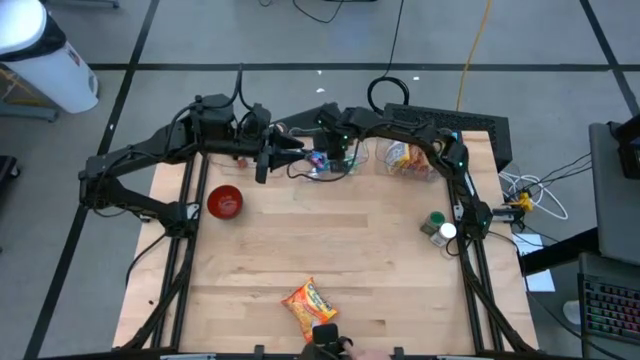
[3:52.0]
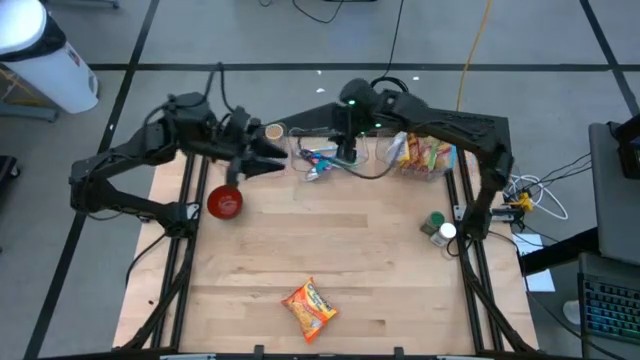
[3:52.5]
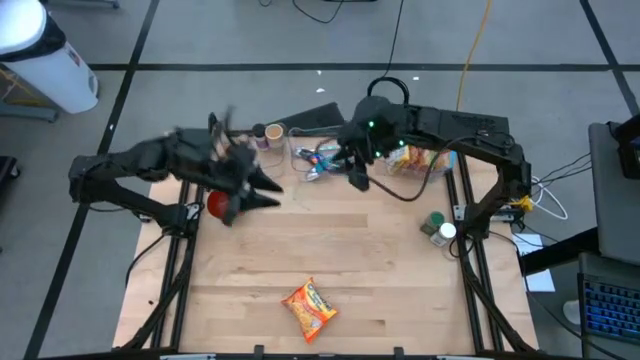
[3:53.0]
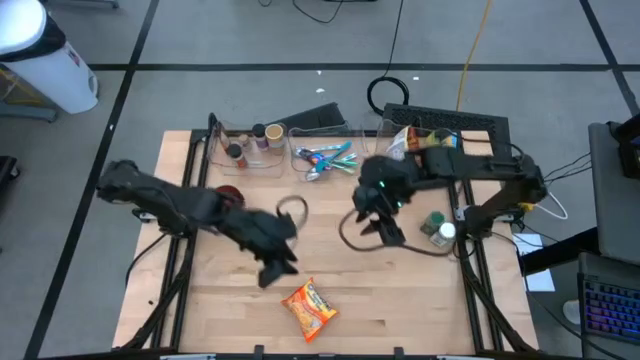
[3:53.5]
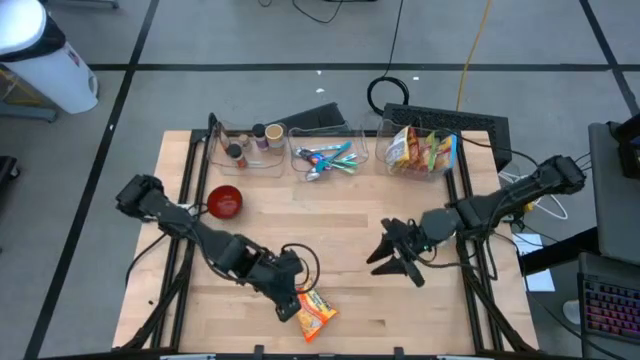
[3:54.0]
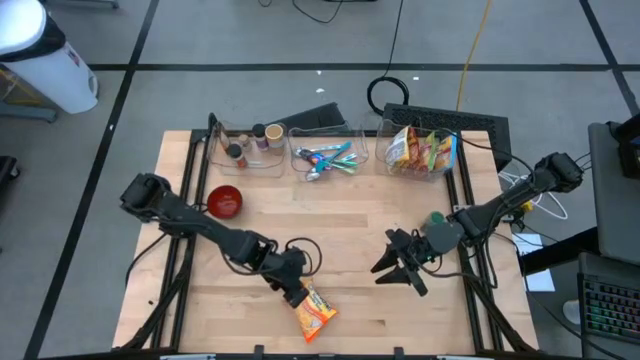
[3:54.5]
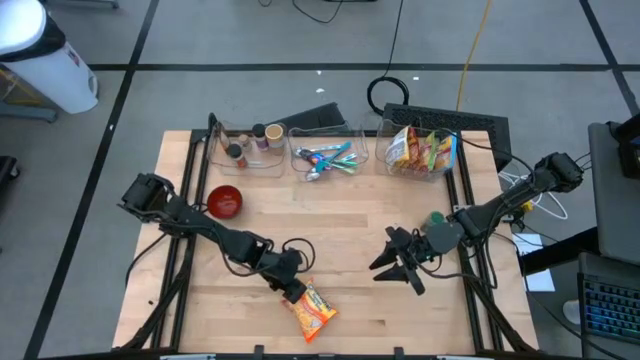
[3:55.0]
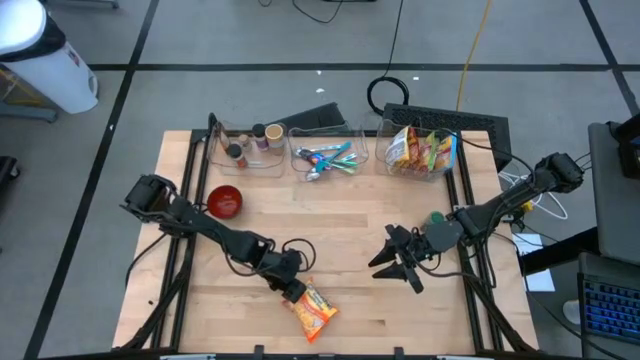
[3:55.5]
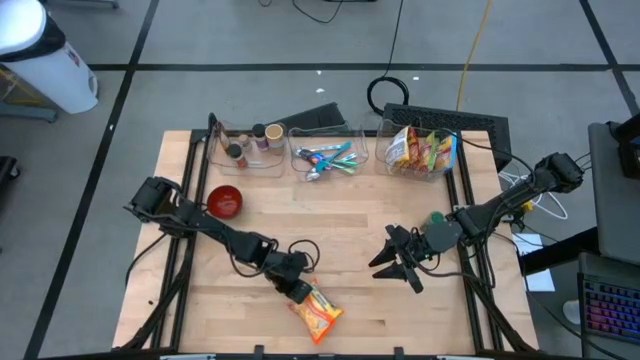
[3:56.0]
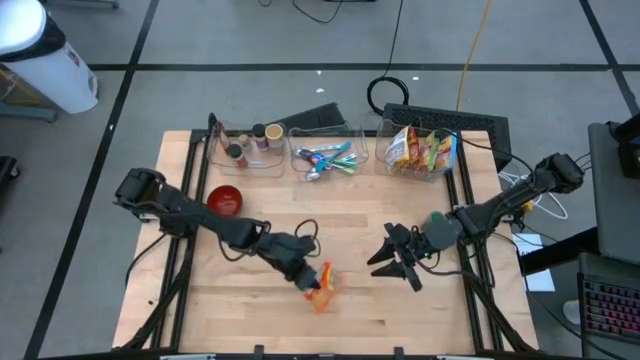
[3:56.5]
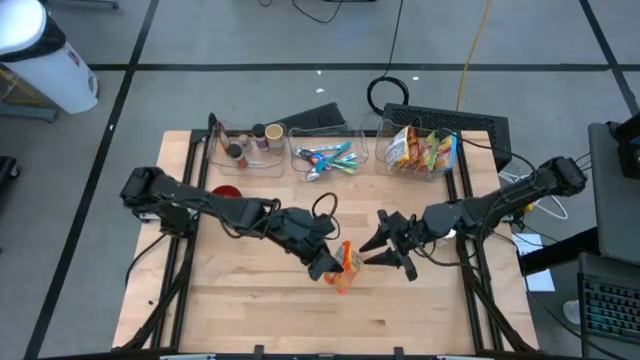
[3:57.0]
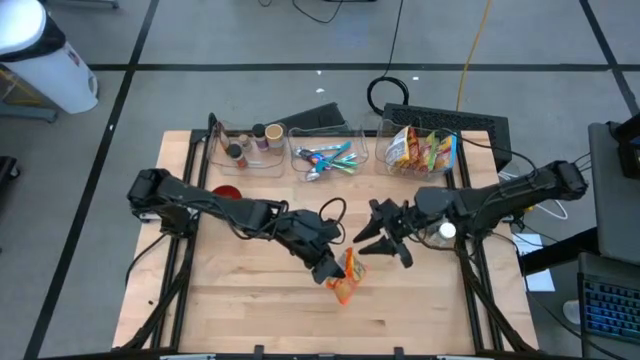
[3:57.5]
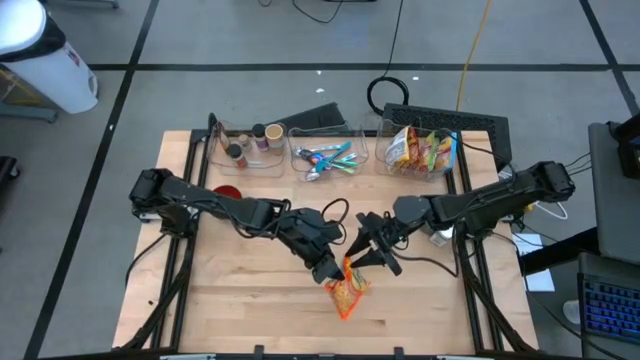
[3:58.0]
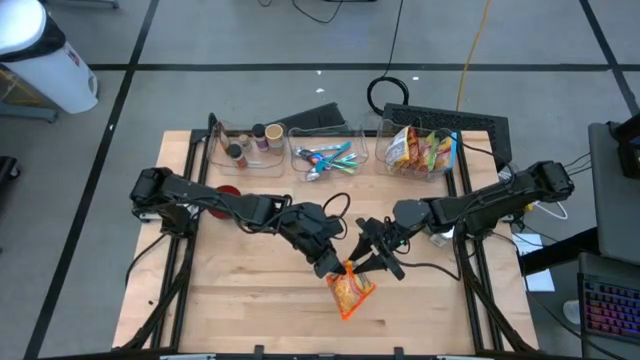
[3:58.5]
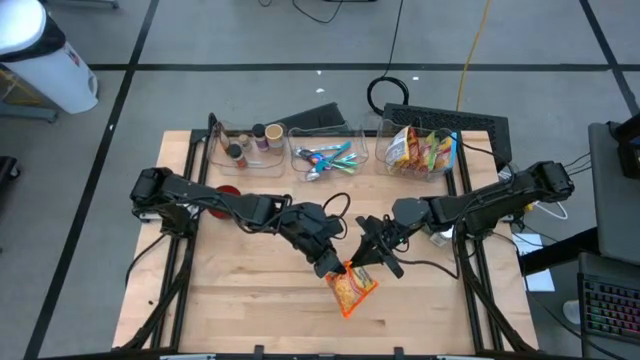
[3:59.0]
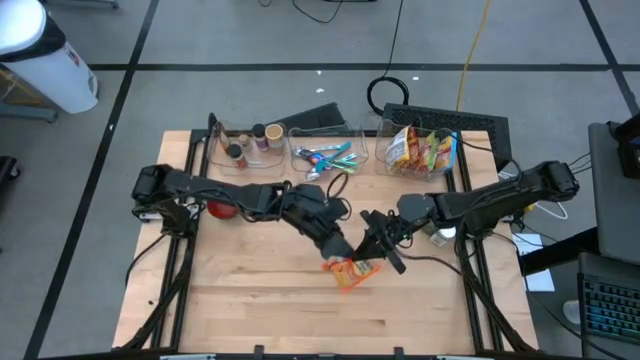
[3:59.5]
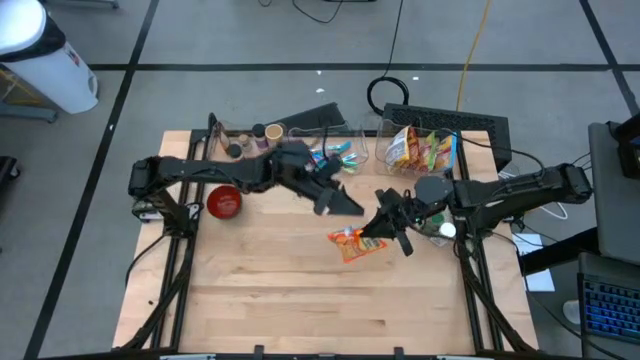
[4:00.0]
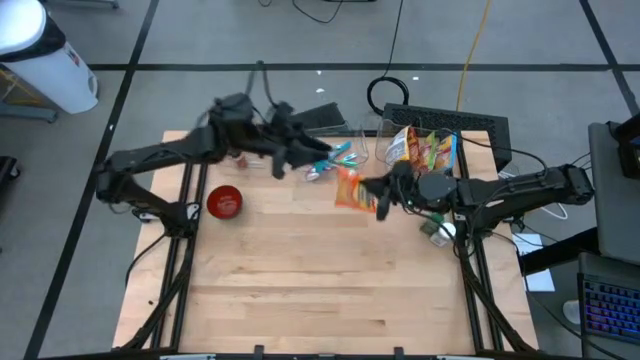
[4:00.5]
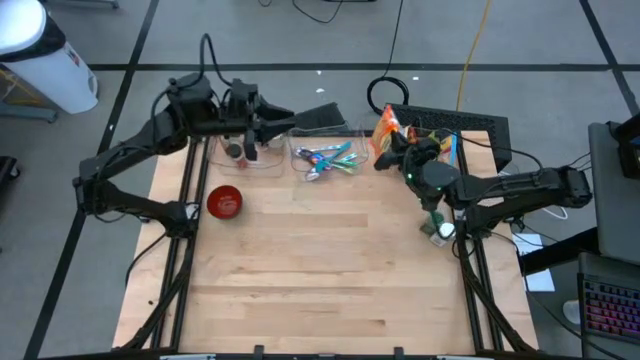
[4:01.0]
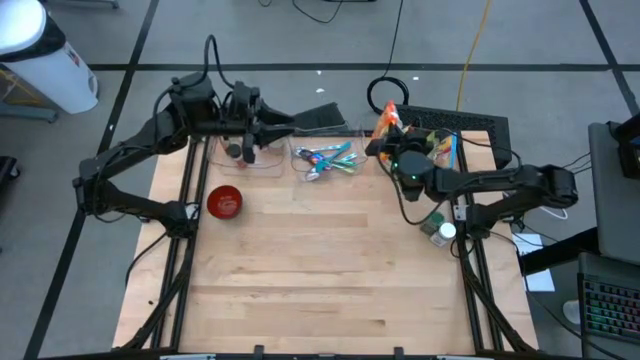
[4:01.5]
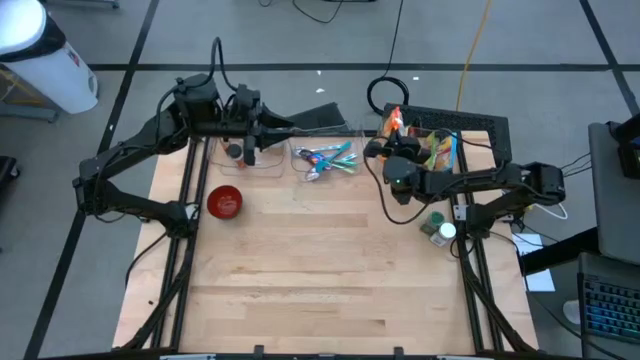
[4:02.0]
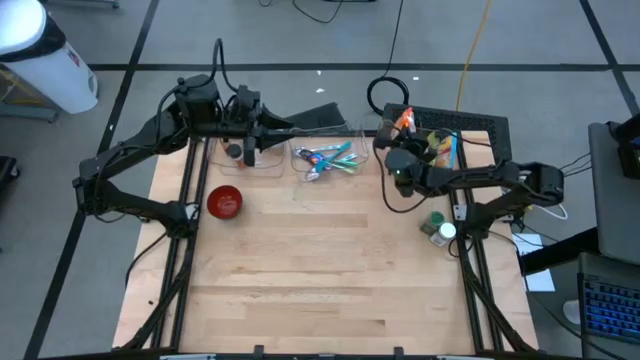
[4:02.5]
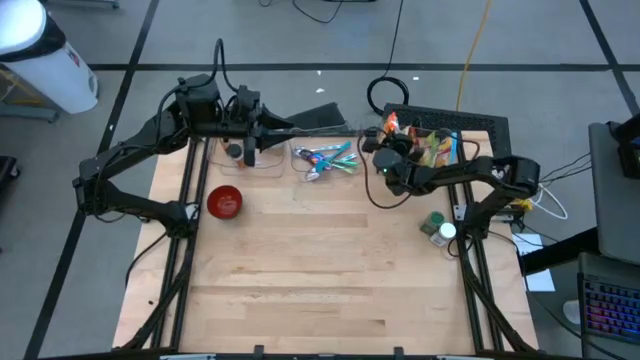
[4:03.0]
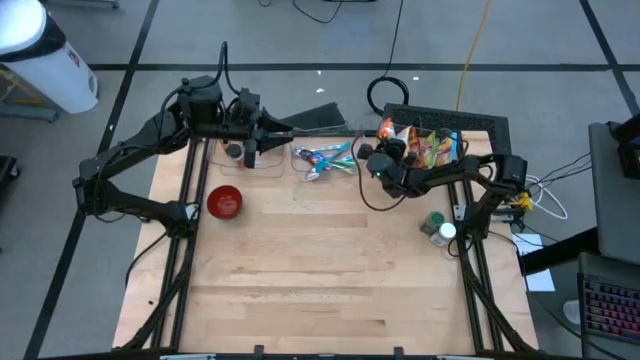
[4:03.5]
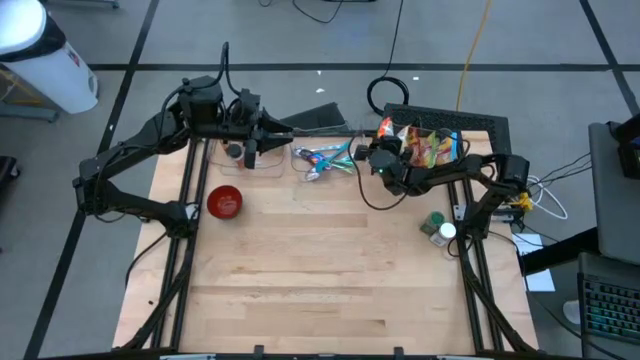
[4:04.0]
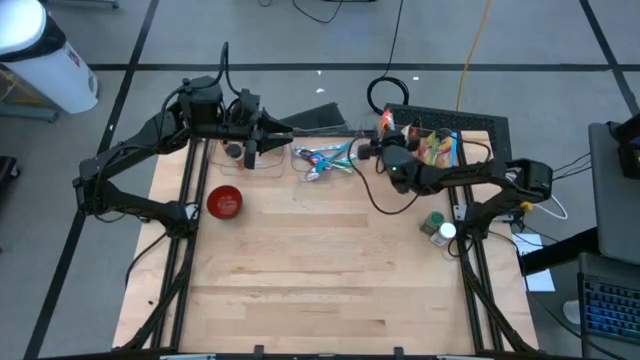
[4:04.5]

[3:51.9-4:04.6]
Task: Pick & Place Food Item
Put the orange noodle pack into the right transparent bin

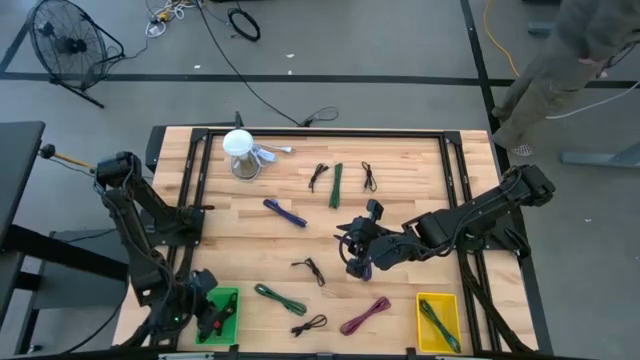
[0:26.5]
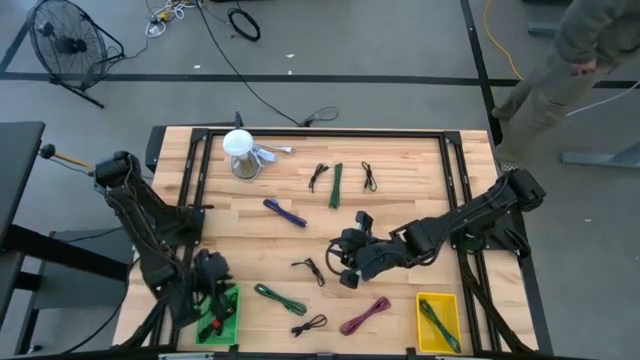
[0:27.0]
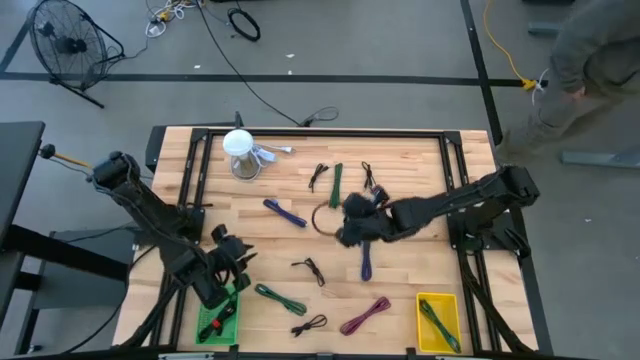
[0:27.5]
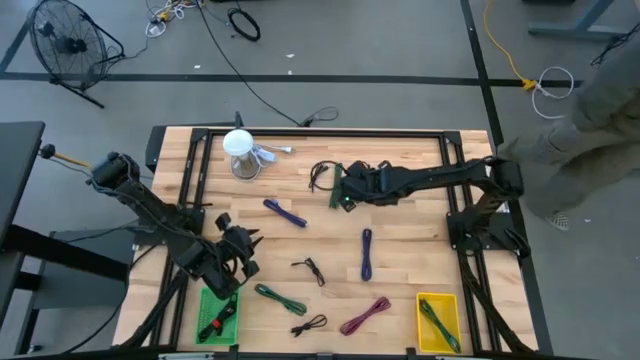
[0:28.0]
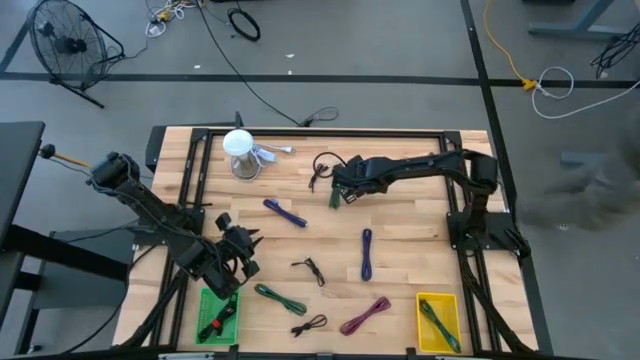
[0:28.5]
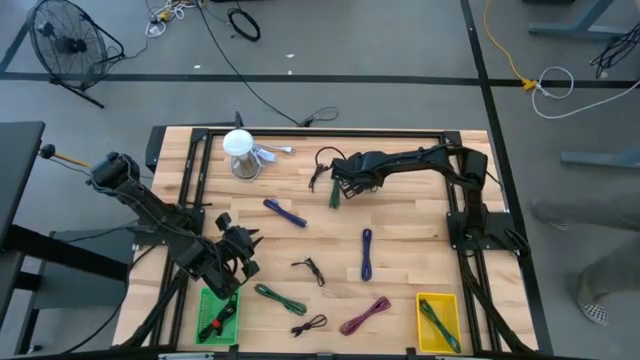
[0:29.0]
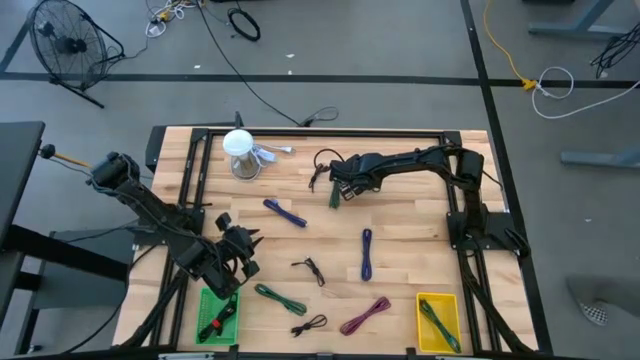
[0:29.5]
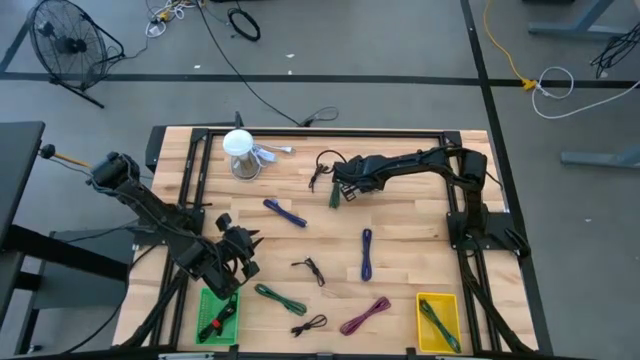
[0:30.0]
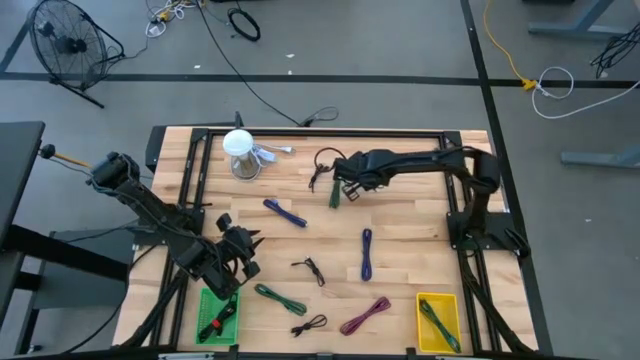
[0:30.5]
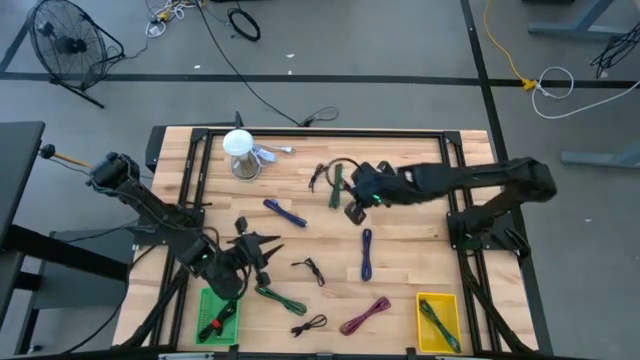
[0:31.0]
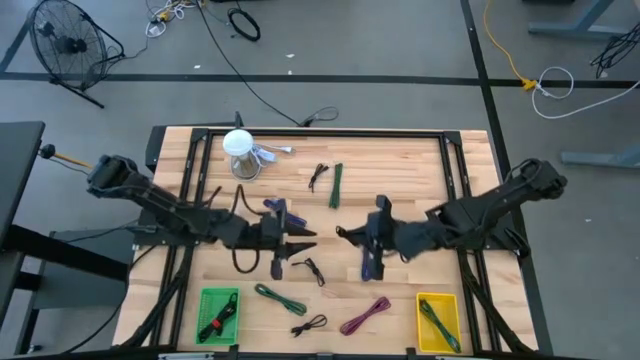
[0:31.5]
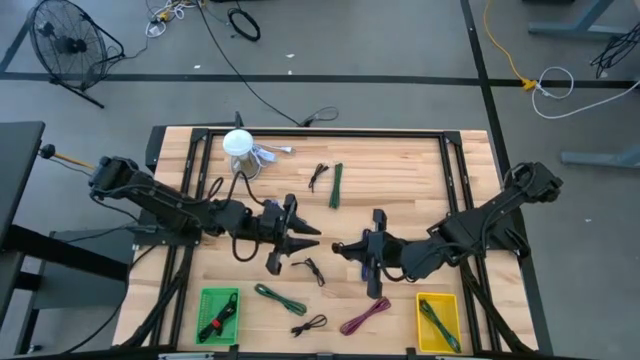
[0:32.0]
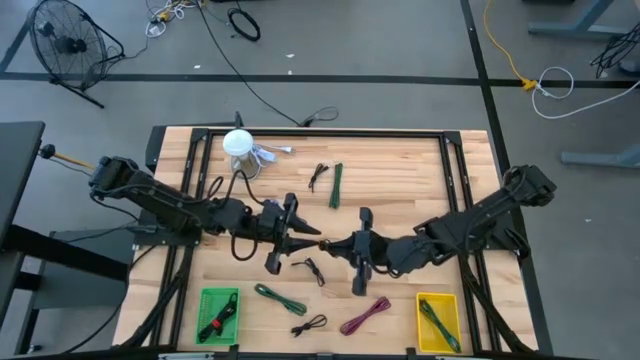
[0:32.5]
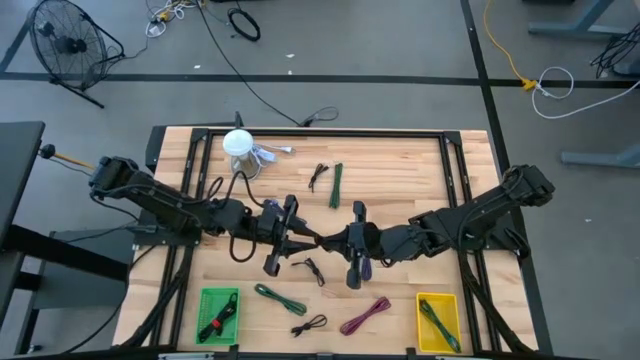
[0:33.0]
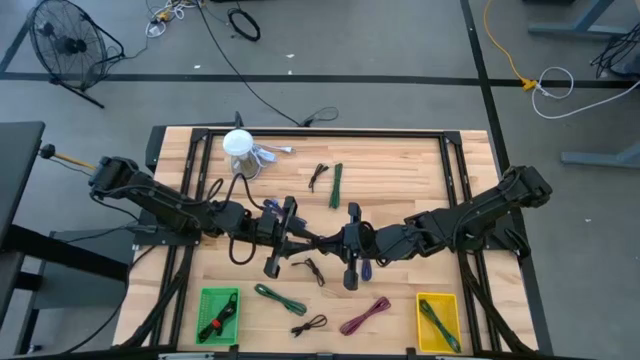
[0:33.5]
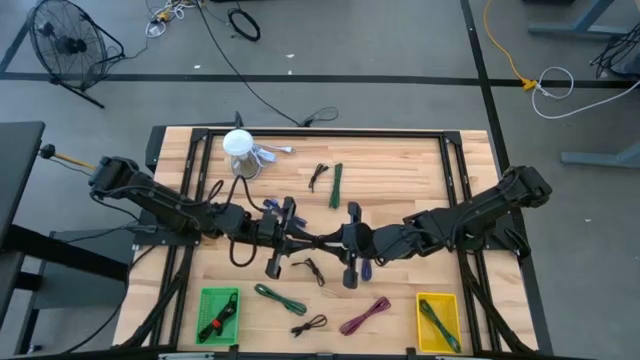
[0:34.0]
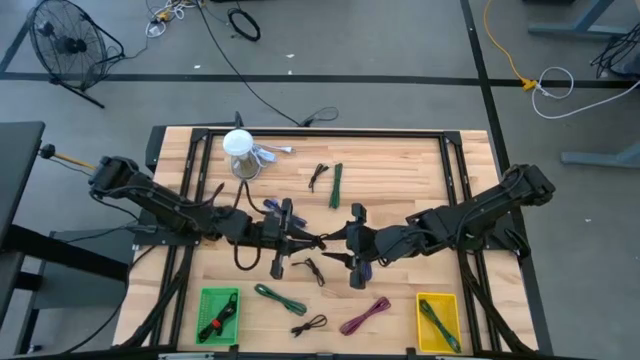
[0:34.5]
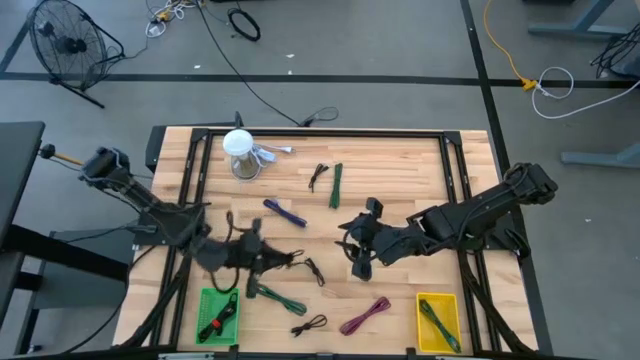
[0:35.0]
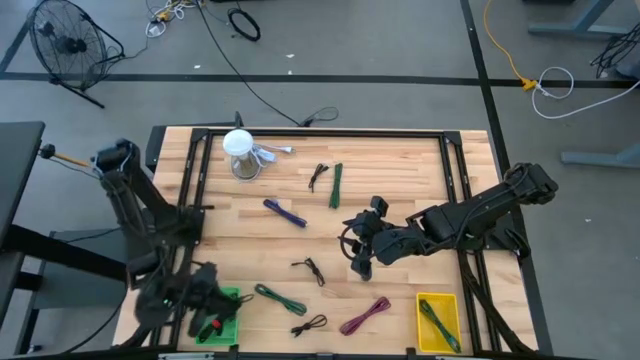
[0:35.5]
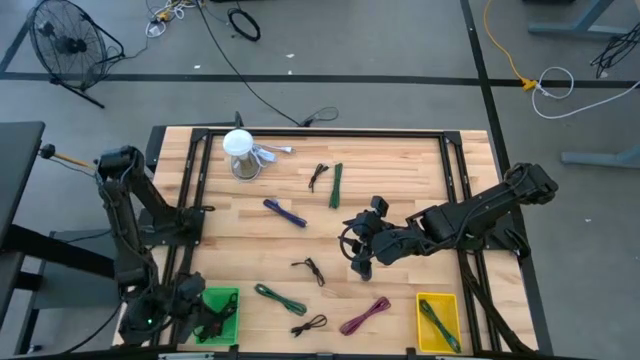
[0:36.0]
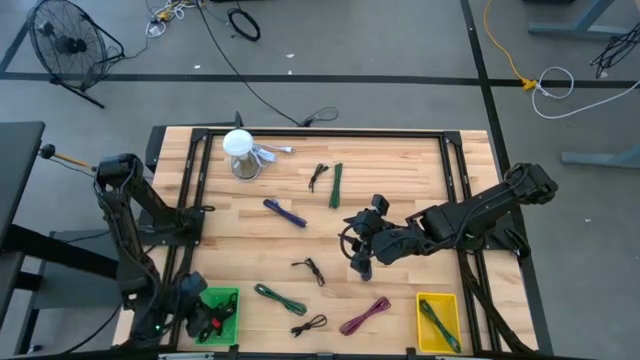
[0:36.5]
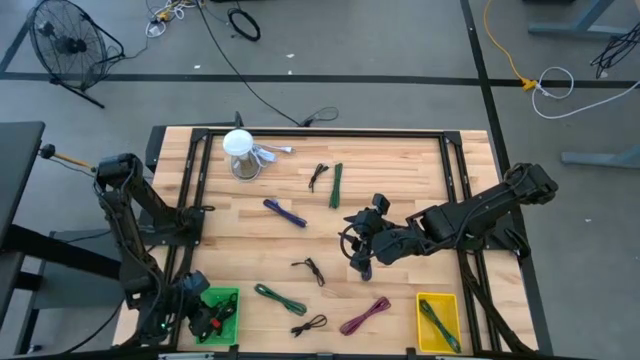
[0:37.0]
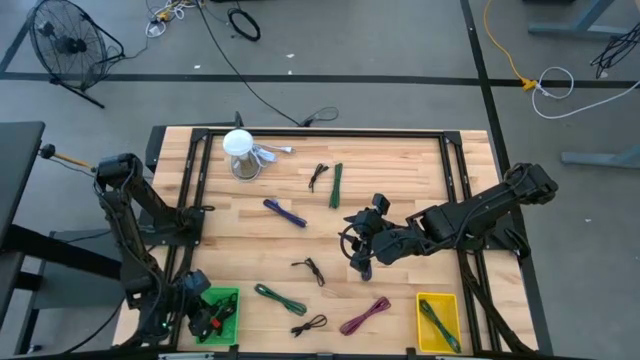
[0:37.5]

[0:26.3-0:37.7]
Task: Pick & Place USB Port
Put the black charger cable into the green bin
